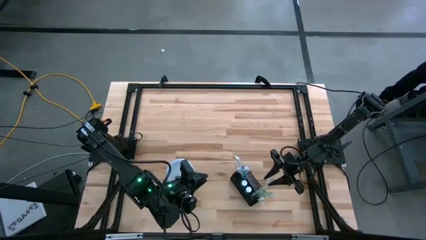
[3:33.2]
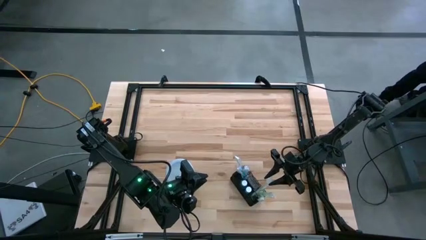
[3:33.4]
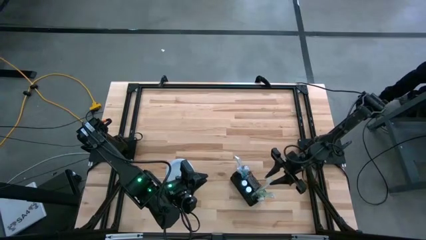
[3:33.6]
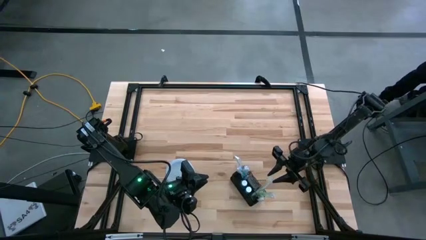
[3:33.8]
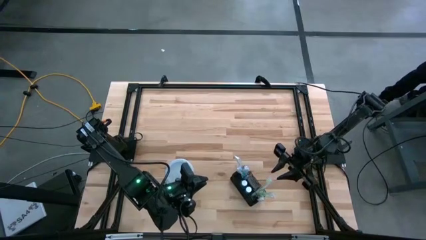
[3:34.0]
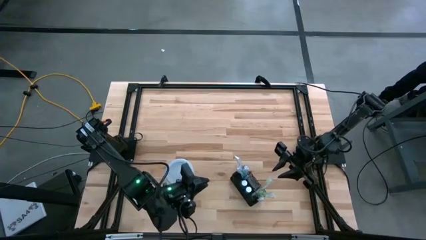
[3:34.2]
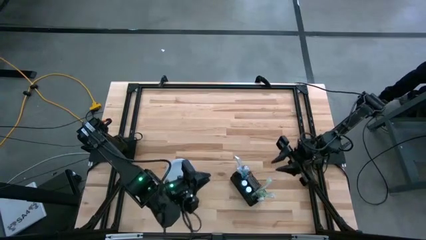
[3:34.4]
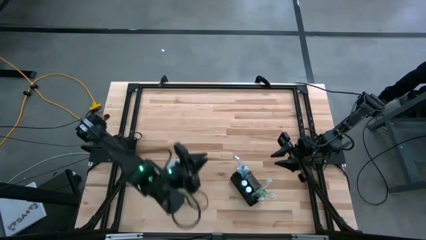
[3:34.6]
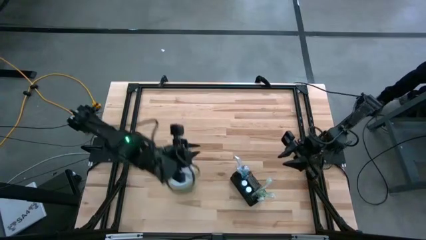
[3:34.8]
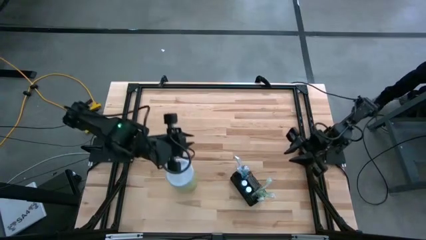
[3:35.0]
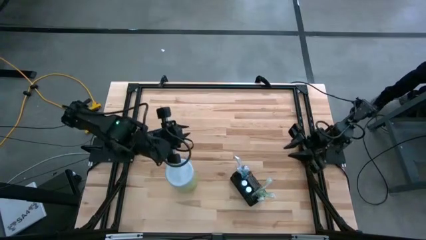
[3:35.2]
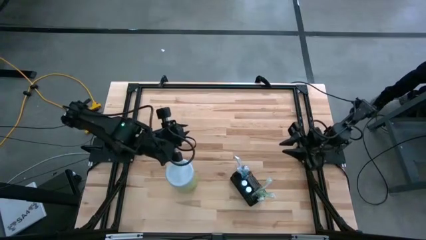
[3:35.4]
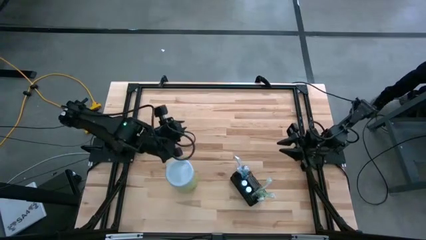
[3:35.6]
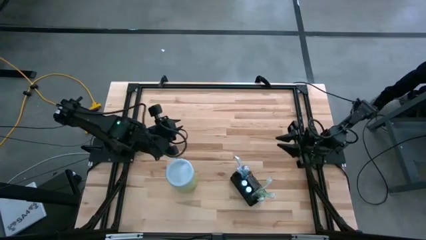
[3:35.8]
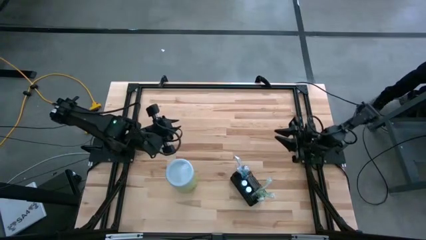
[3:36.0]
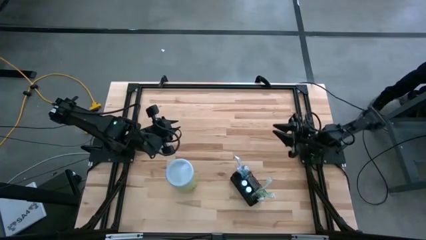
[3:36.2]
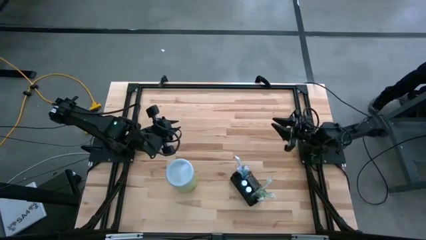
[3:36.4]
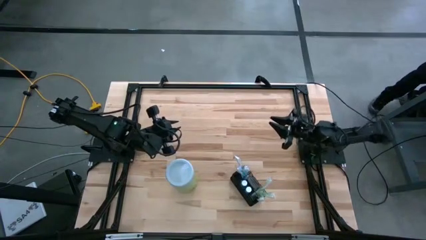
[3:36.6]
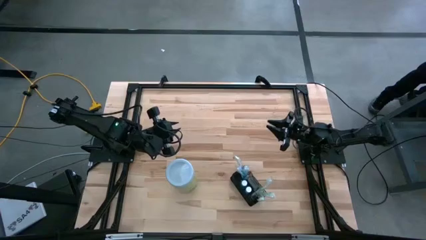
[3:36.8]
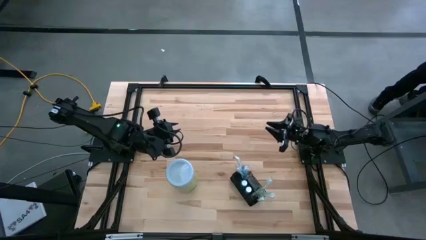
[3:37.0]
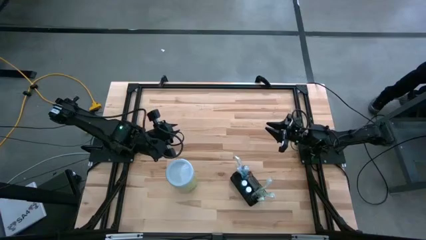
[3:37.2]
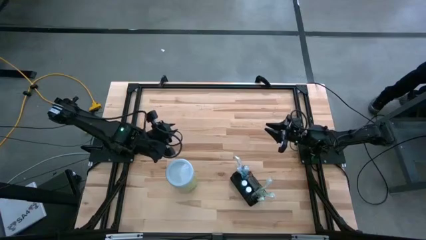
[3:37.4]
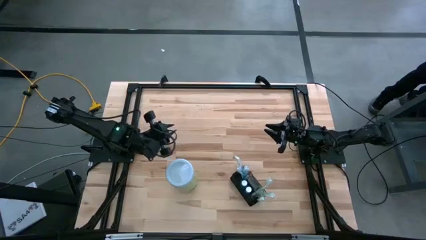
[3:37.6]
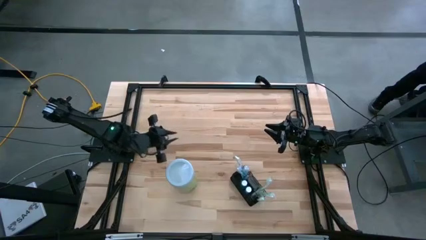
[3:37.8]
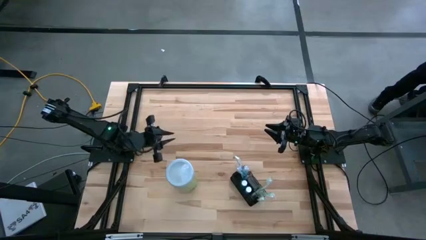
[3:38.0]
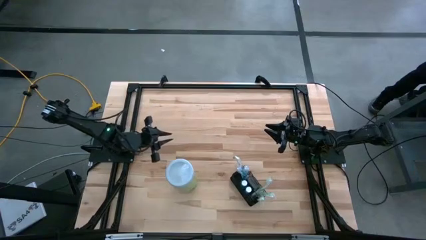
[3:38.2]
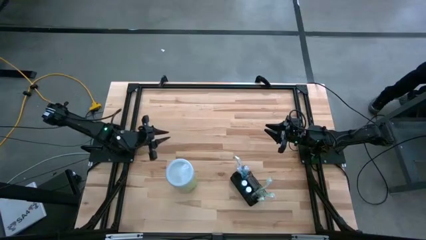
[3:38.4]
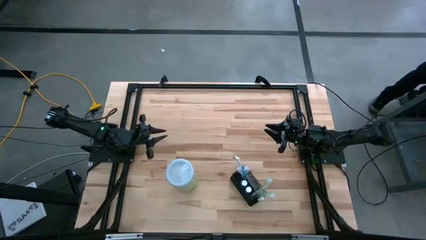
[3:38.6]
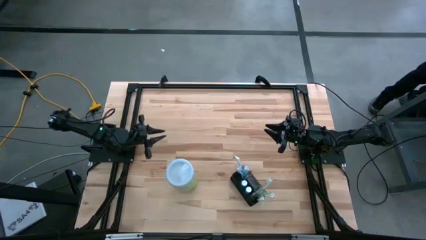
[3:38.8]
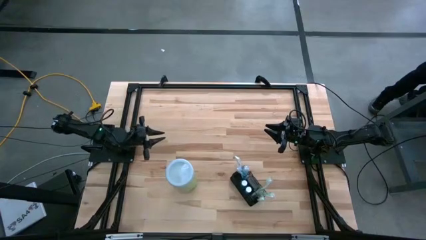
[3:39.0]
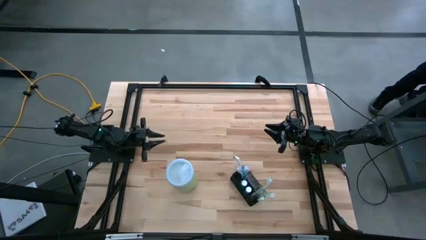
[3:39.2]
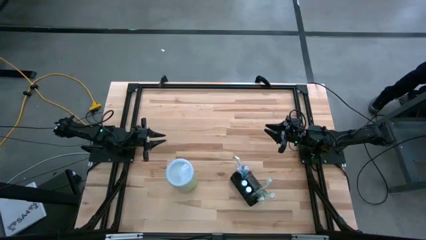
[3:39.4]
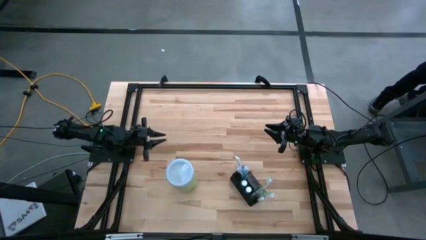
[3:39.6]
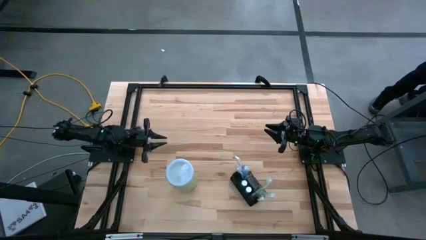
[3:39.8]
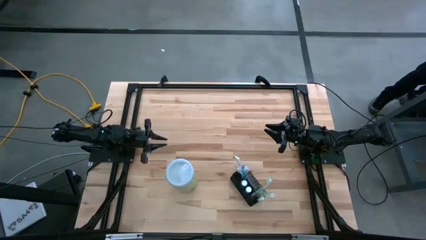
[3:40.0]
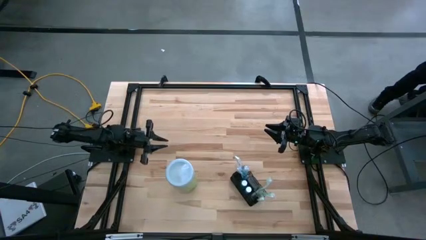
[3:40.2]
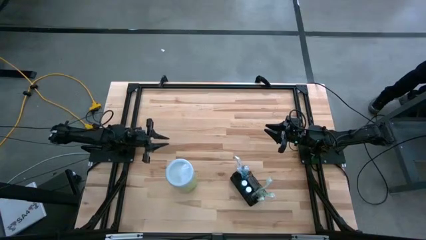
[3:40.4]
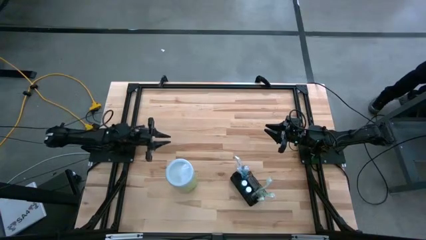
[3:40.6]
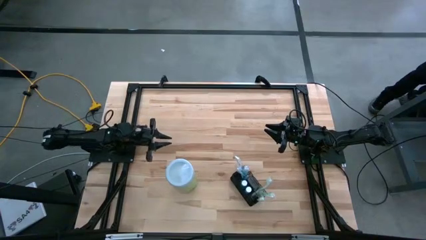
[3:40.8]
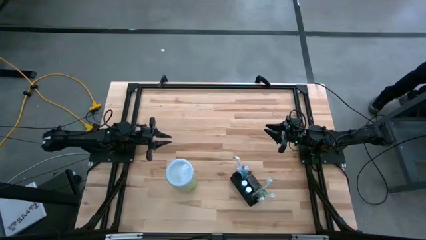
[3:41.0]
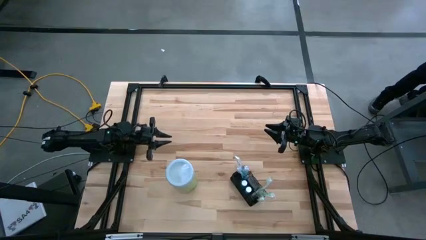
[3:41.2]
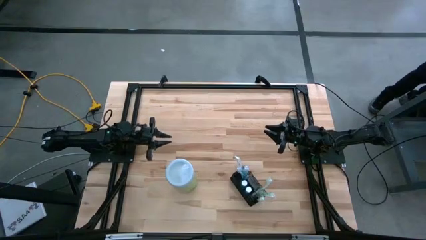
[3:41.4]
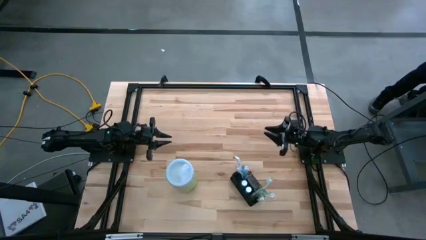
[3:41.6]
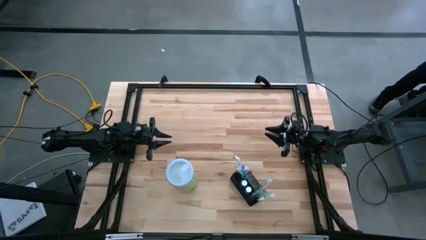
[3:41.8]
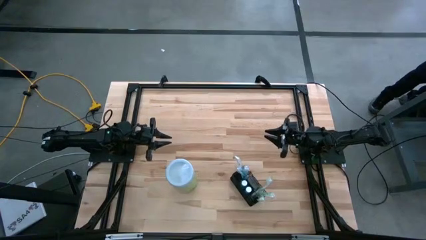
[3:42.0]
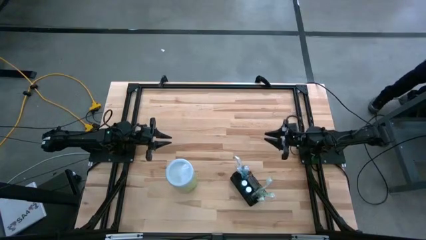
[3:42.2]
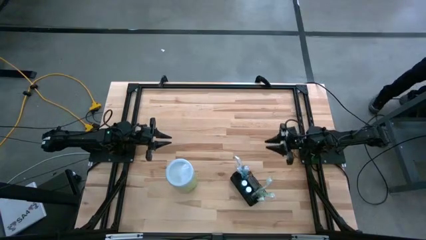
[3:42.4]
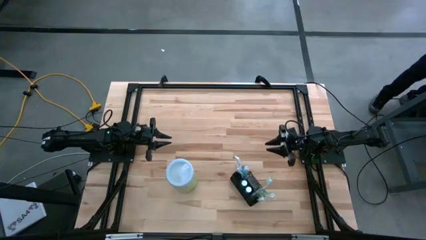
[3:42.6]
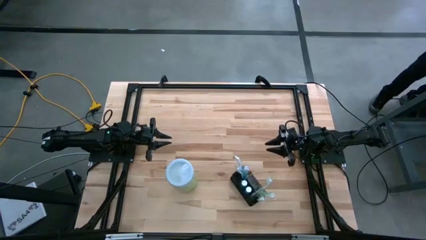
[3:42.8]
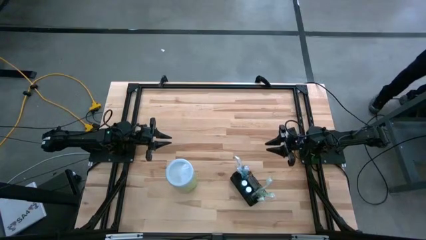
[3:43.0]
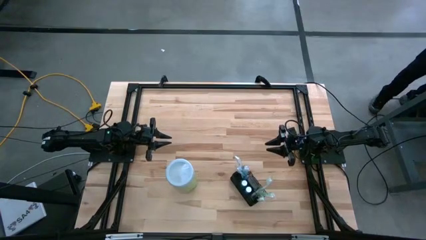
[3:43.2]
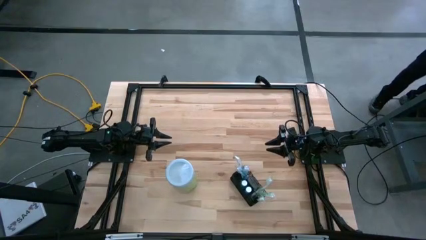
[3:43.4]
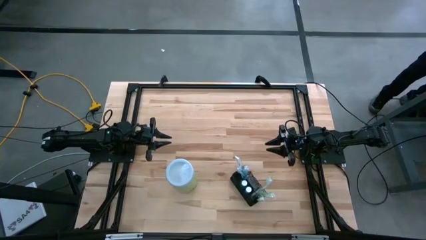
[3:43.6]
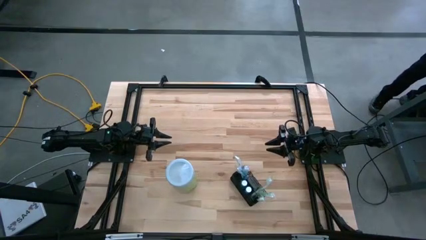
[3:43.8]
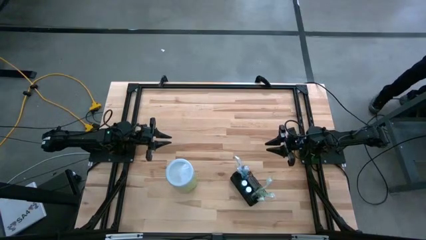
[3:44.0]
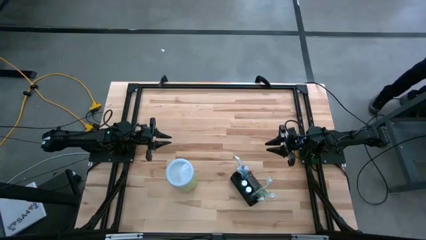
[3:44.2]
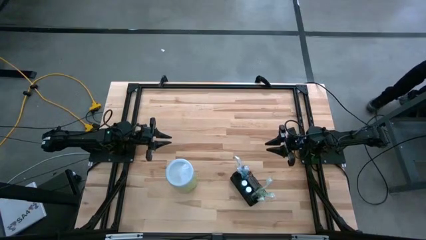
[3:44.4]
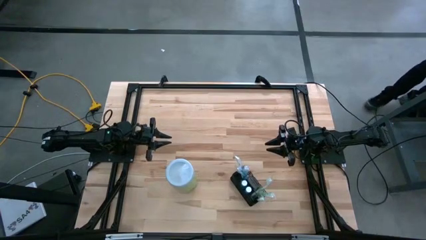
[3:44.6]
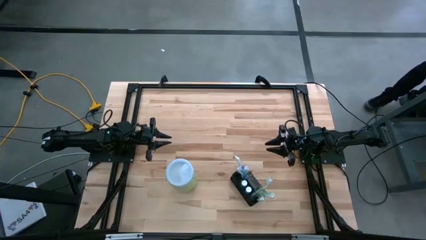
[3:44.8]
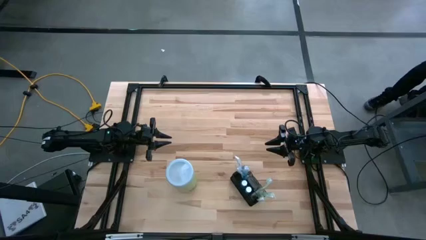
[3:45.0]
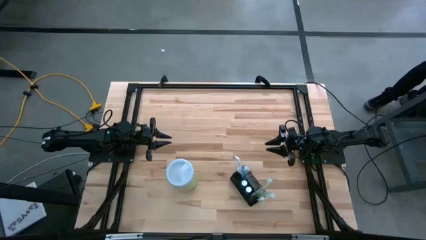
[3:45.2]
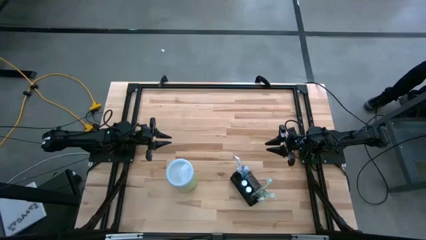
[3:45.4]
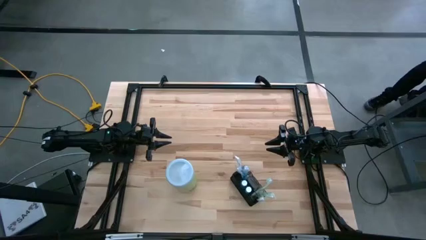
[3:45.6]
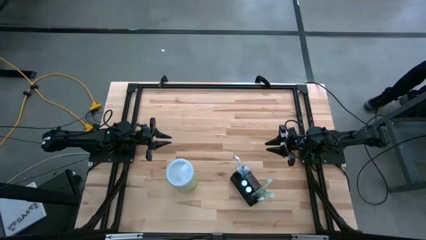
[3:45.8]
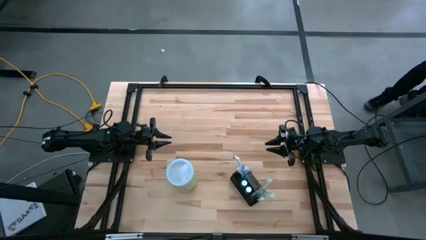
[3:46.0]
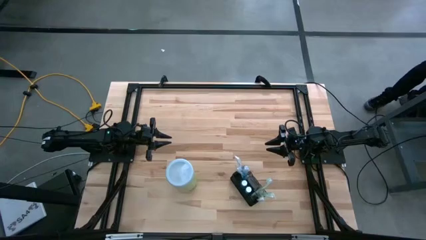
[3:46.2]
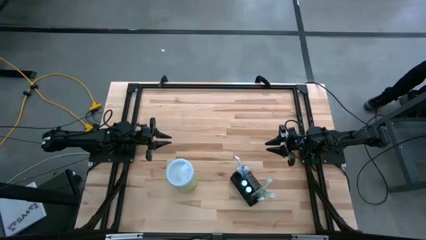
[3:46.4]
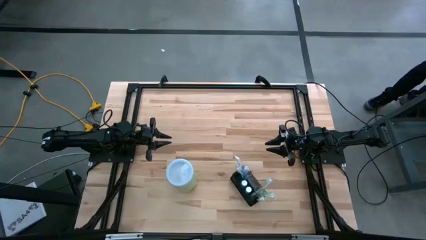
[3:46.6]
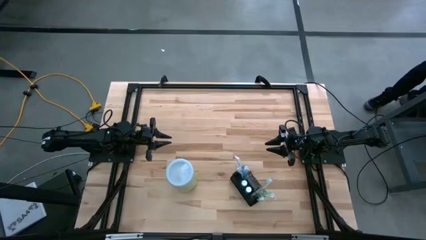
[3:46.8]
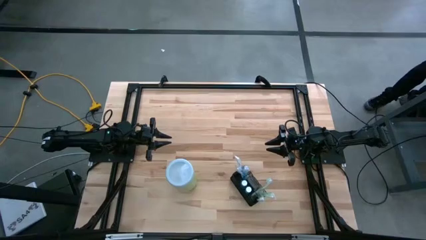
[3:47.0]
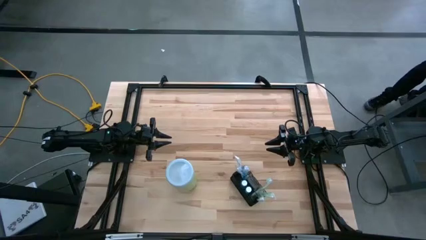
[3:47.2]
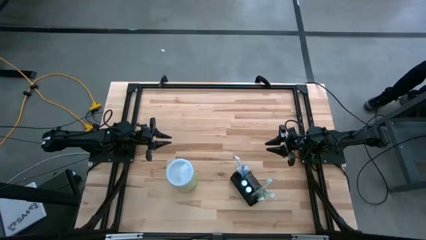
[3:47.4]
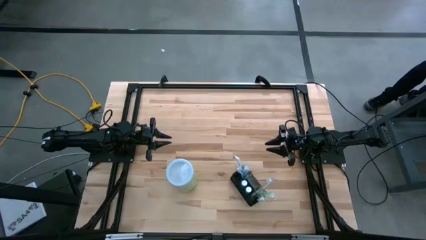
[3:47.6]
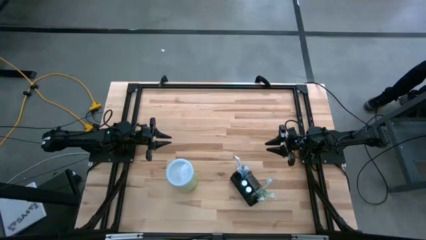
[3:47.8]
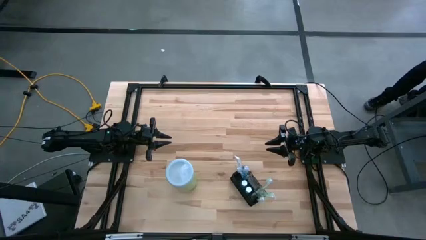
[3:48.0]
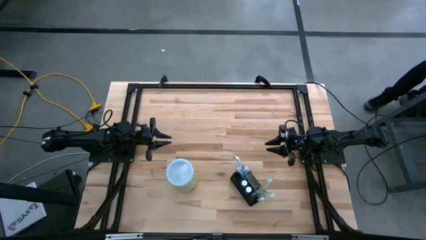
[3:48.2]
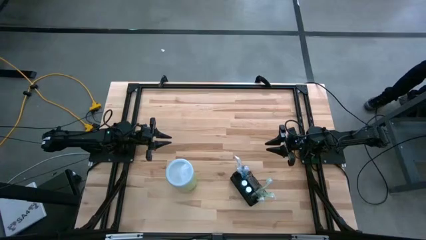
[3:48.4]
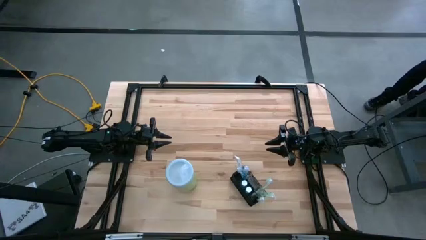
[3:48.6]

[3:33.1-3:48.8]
Task: Pick & Place toothbrushing station
Return to Home Position

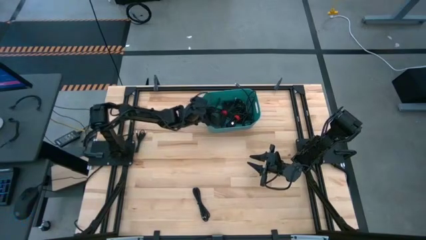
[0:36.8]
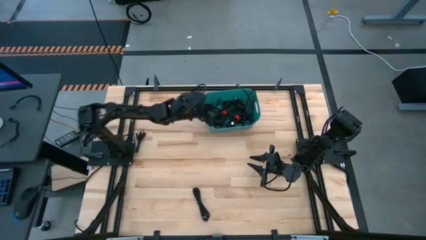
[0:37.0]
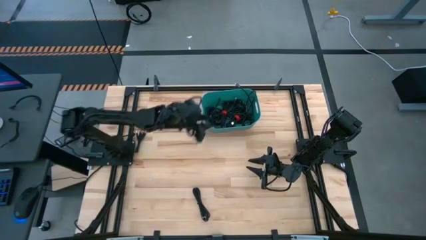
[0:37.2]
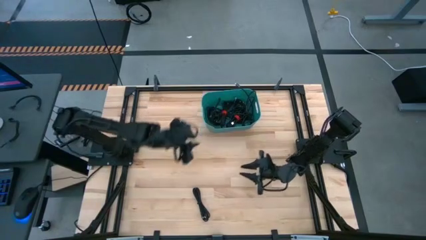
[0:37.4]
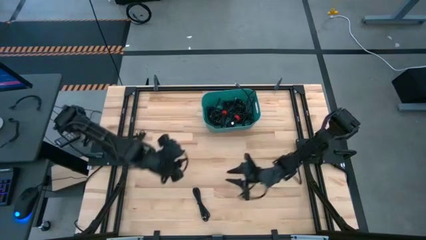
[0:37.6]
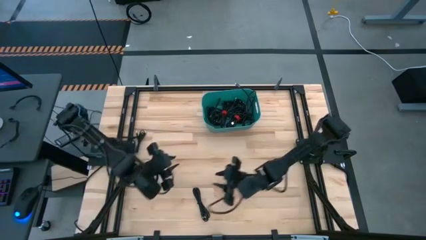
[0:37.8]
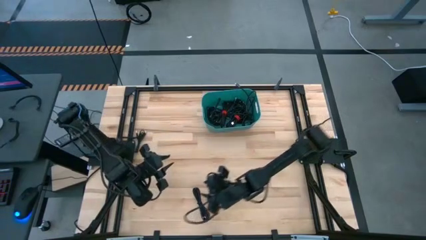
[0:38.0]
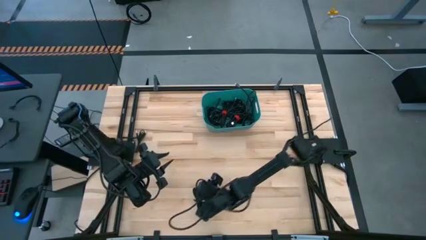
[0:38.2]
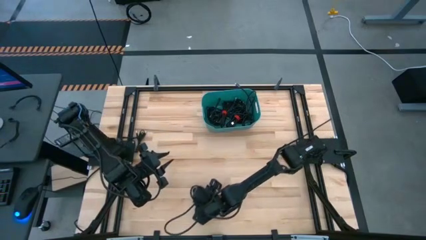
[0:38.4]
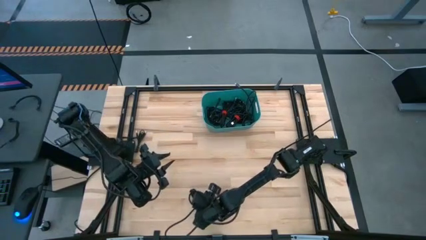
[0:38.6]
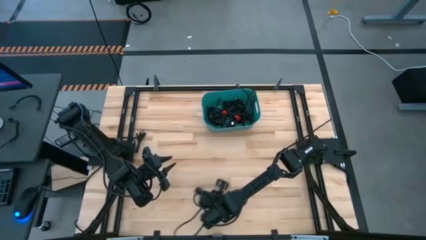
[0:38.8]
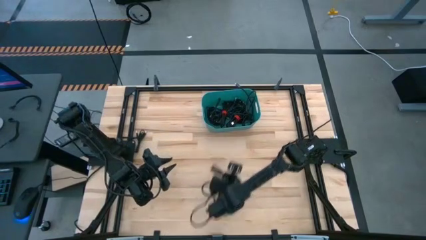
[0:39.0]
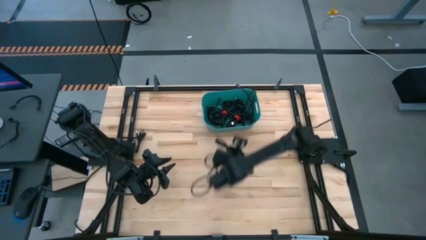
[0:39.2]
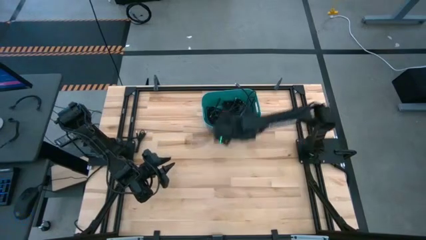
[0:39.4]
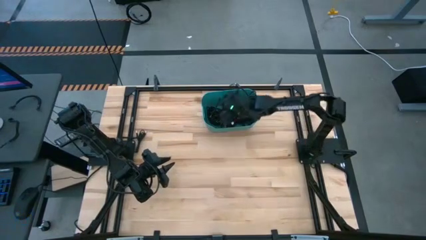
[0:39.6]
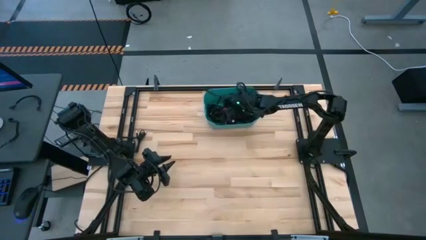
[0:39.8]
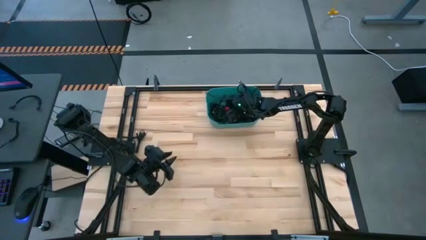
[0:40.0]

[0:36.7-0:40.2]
Task: Pick and place USB-C Cables
Put the black charger cable into the blue bin
